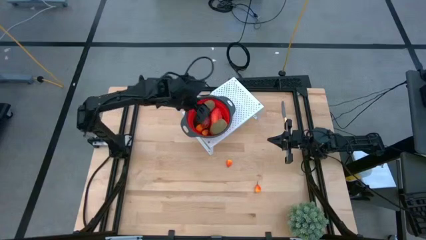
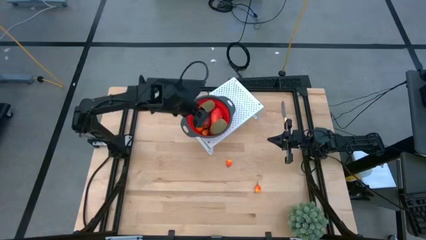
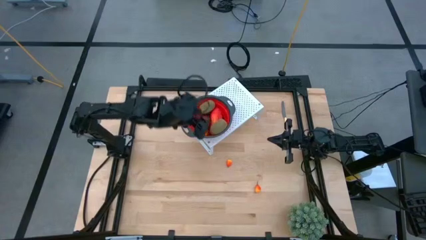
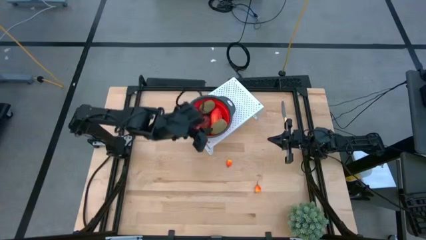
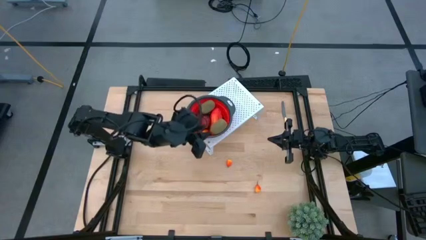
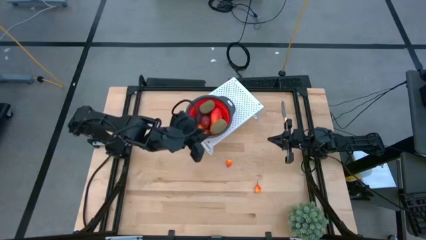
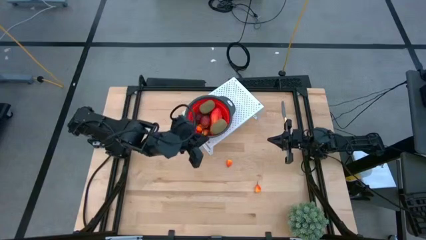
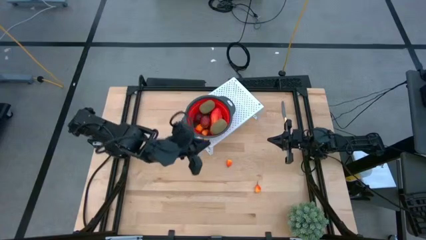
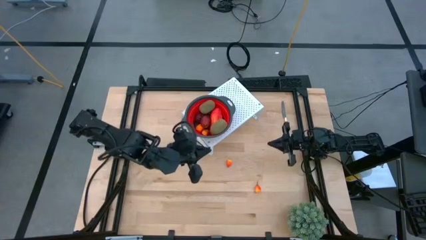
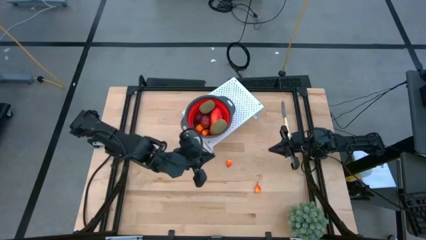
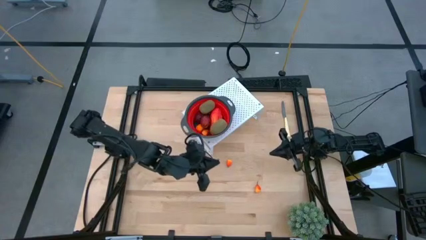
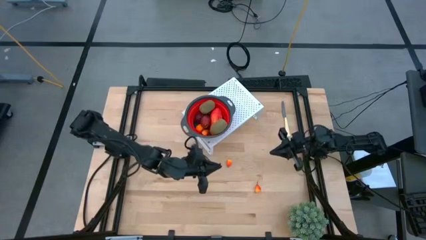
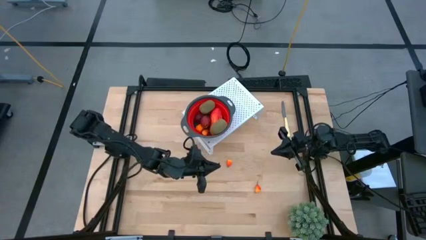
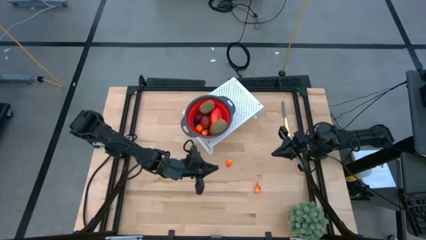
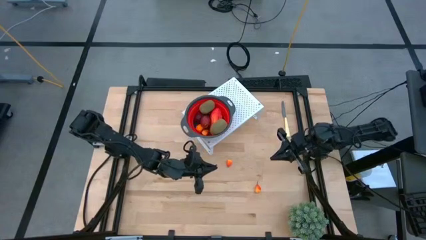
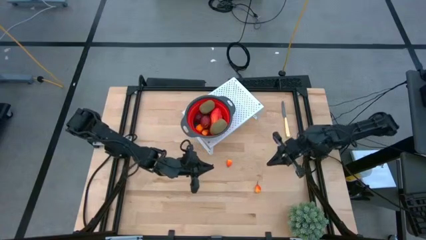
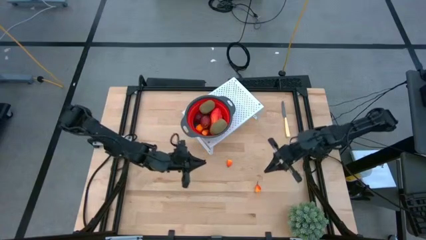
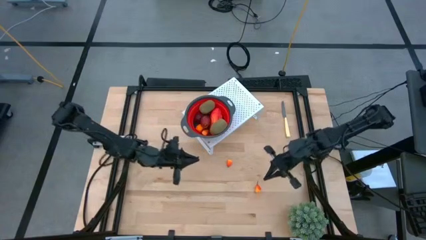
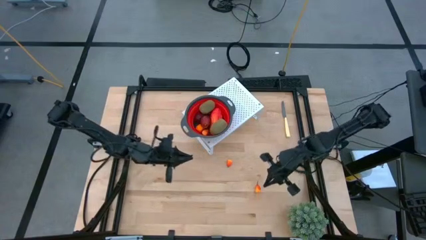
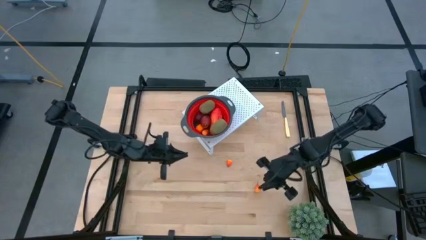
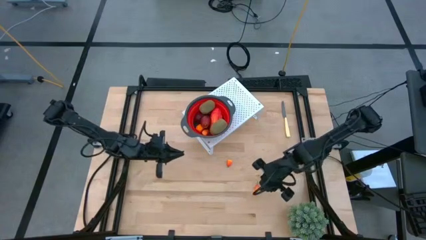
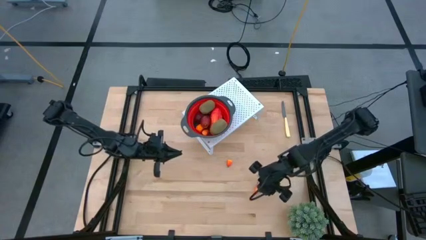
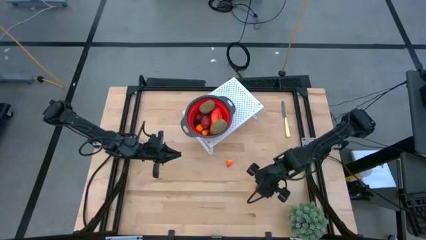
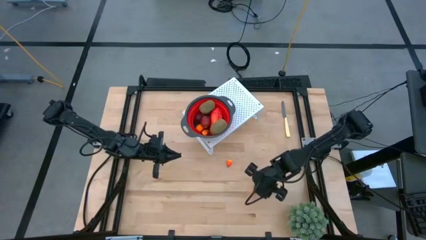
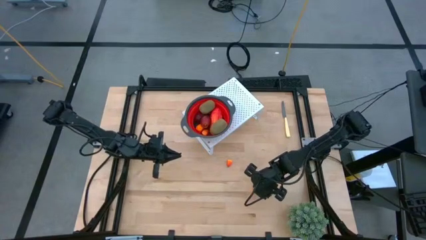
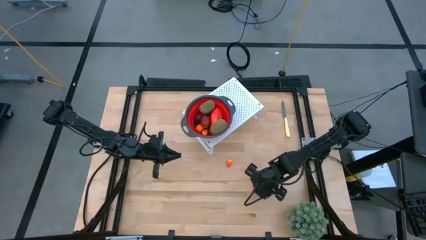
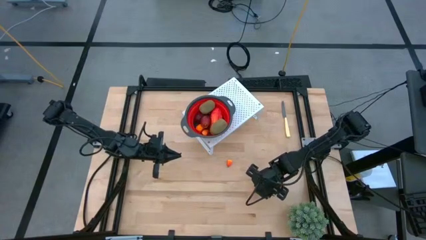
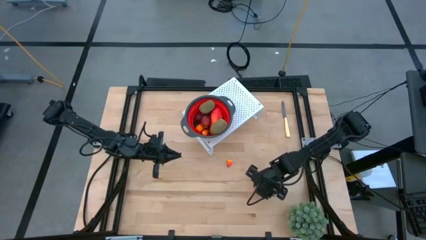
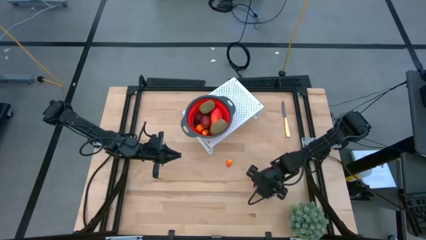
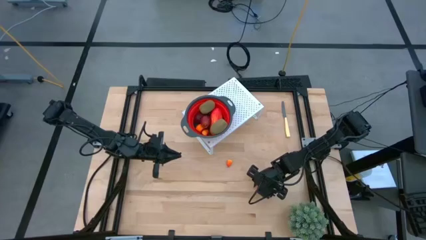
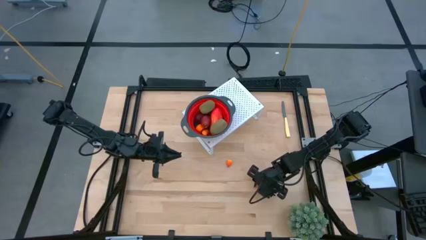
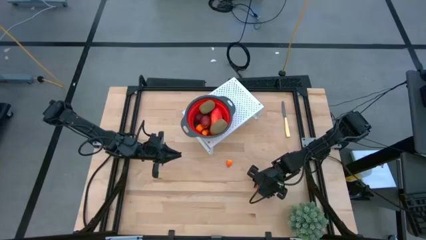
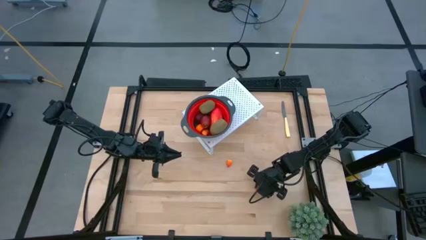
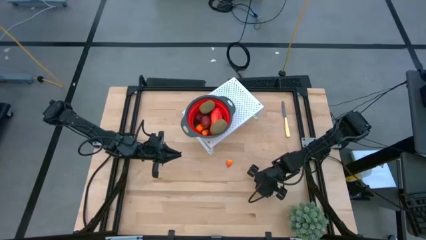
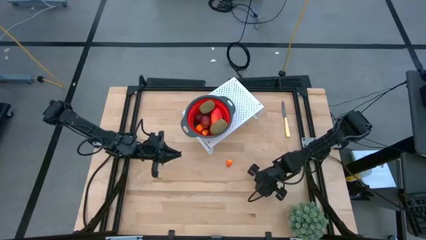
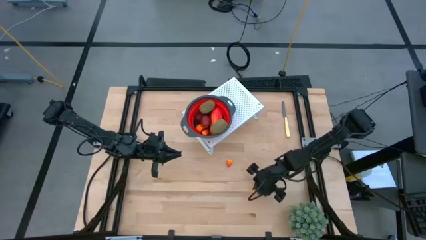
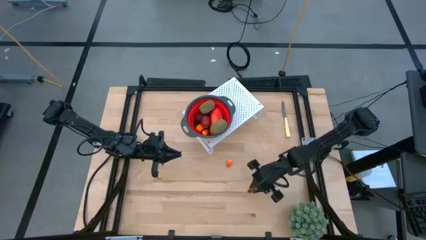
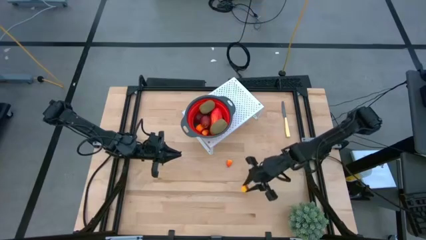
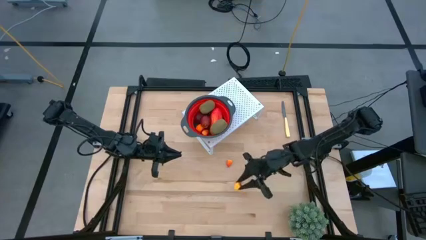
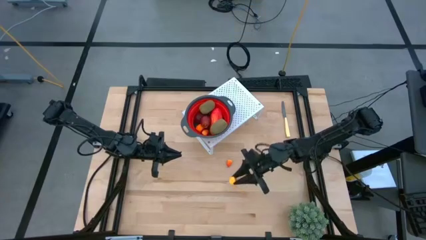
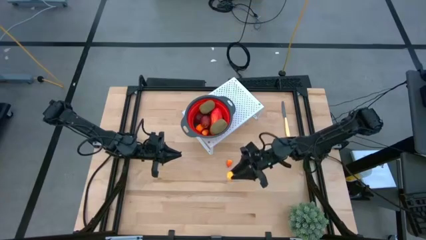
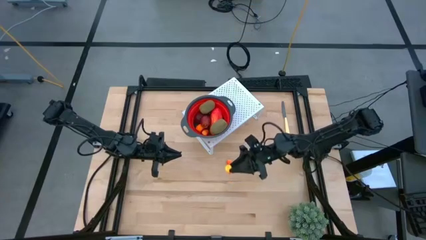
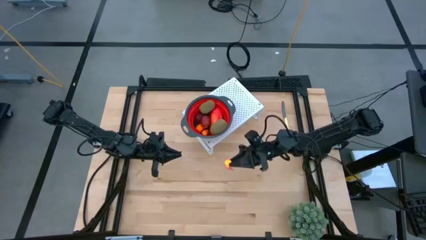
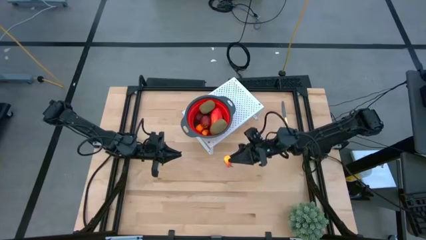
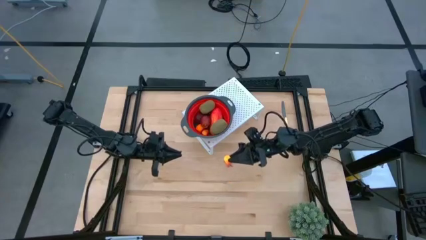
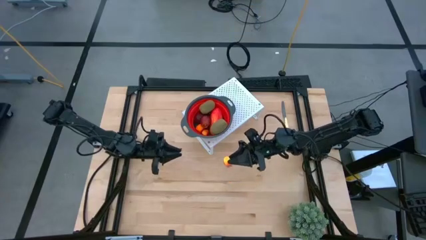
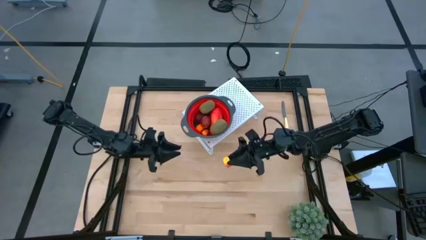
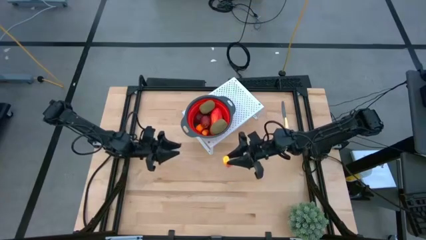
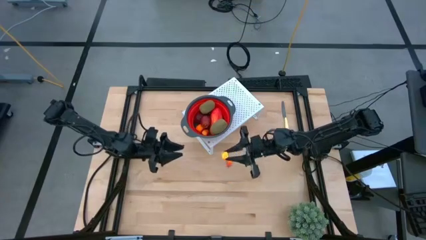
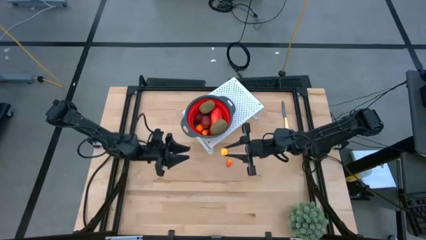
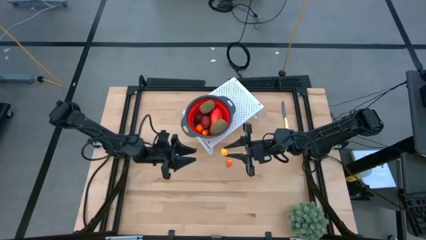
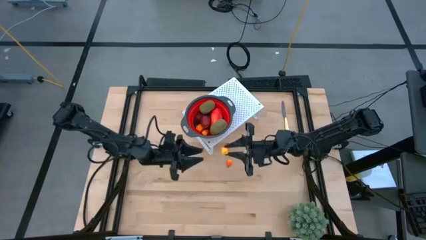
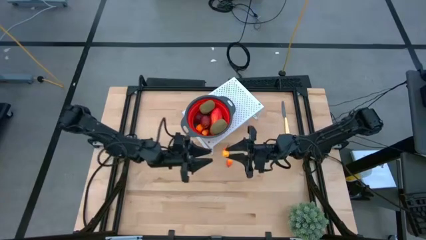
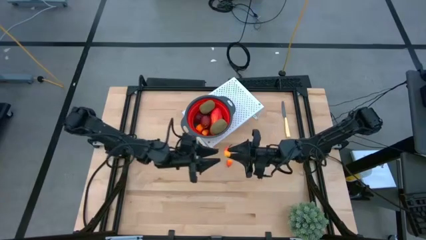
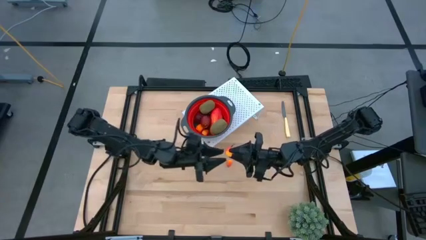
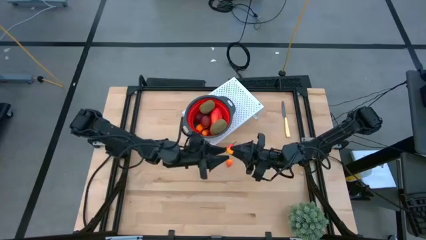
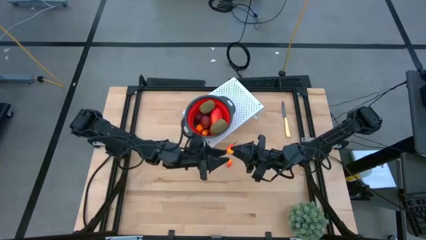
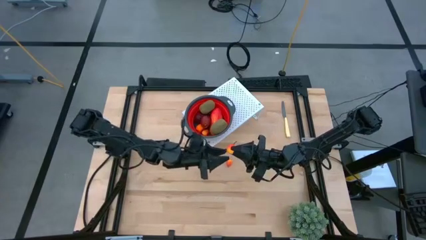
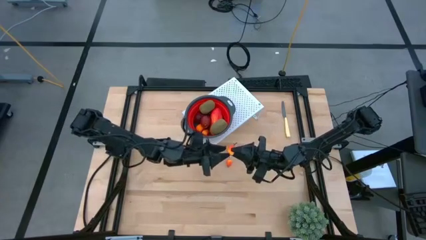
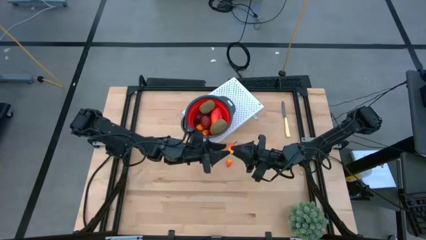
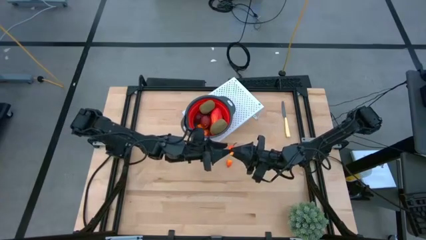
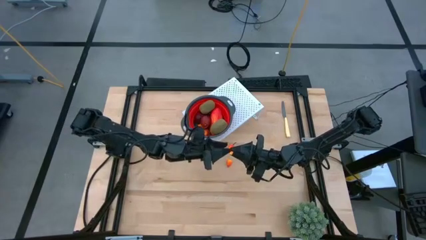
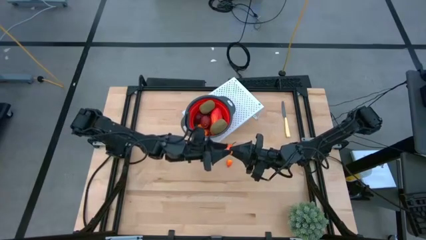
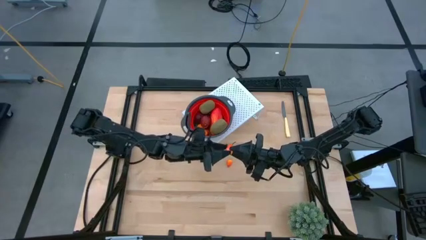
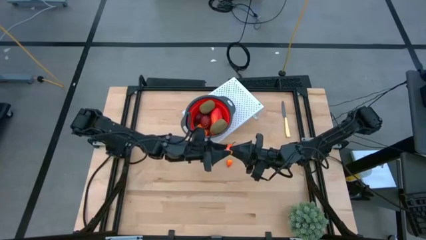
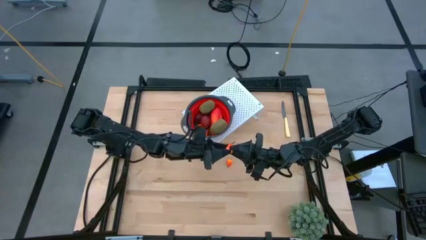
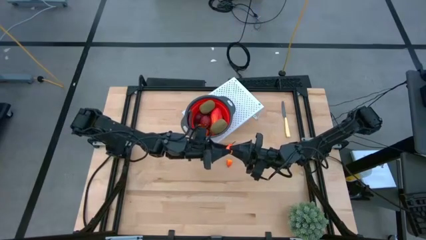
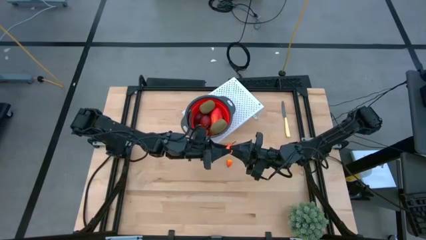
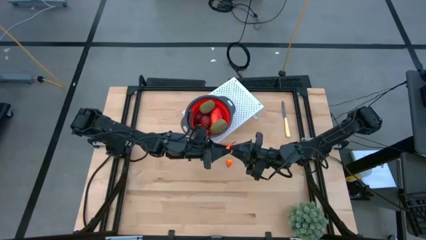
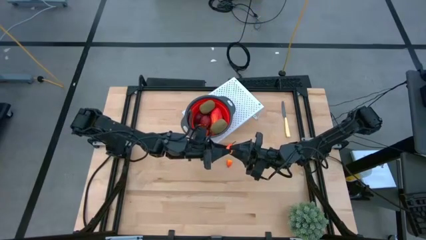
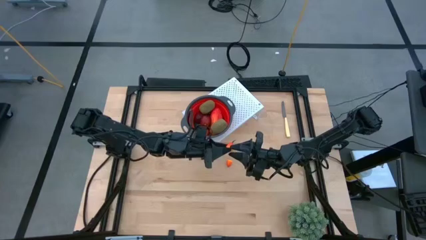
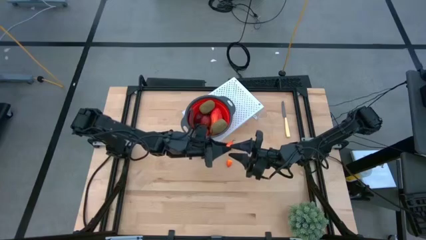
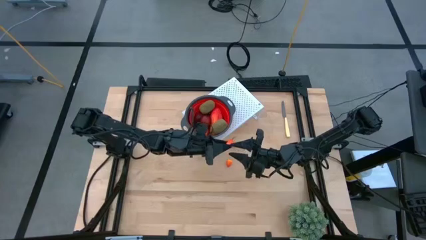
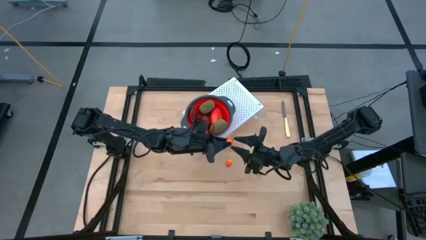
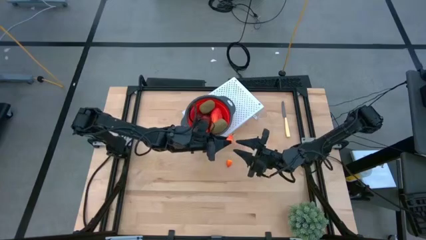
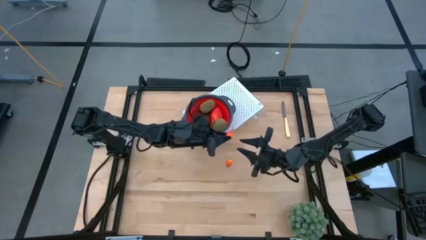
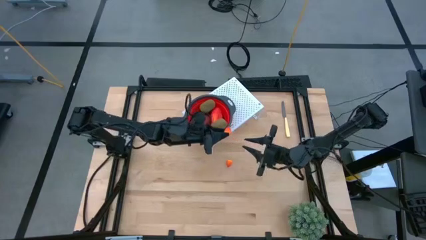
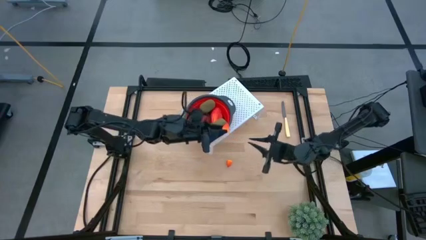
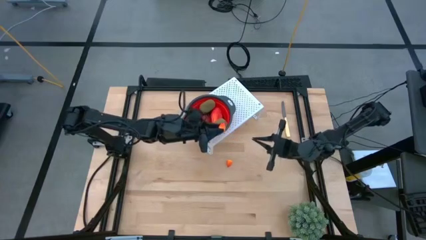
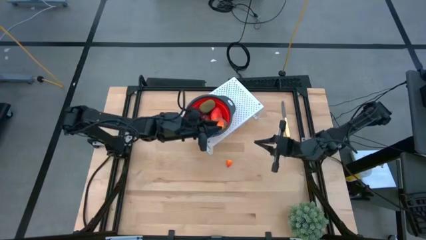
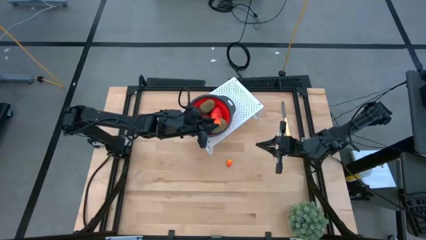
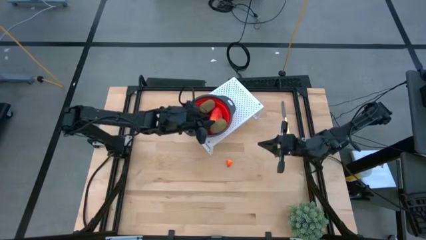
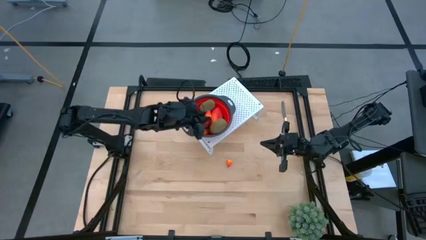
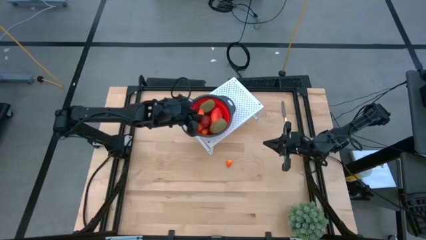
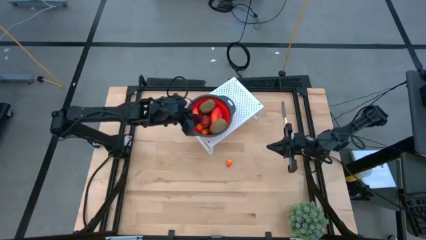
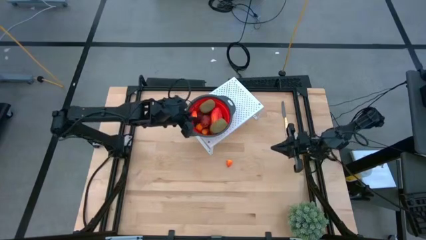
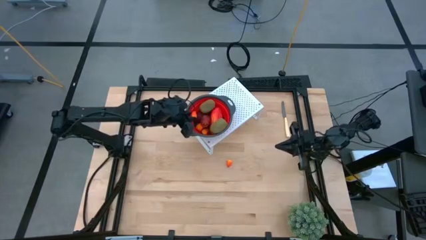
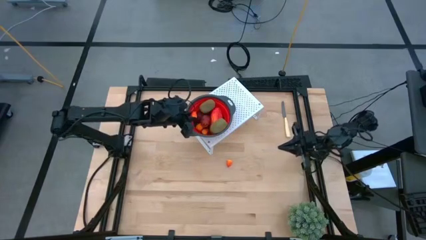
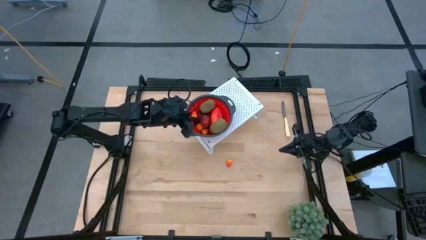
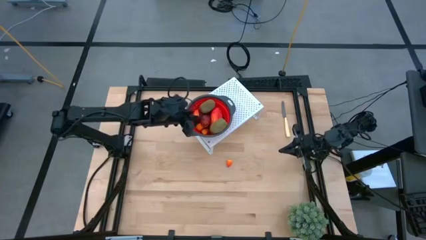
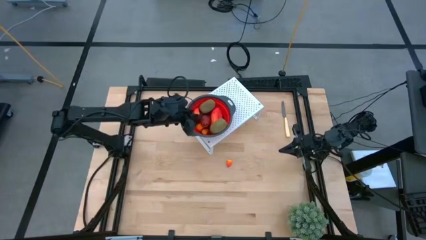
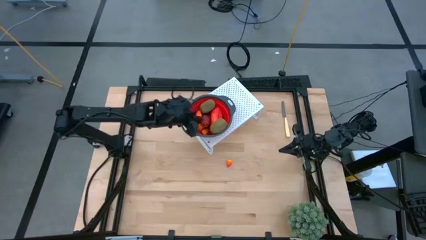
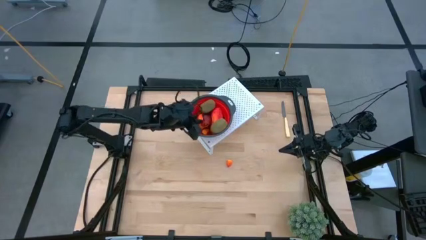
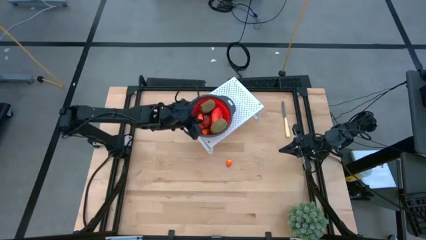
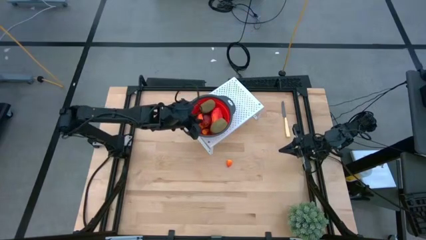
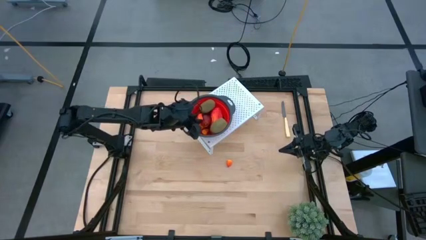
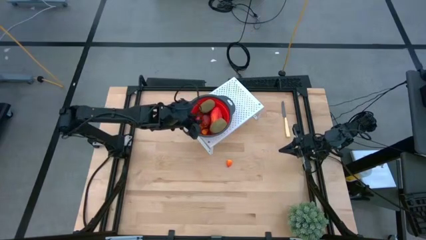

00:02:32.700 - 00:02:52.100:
Task: Pick & Place Fruit
Put the pear into the red strainer bowl on the shelf
